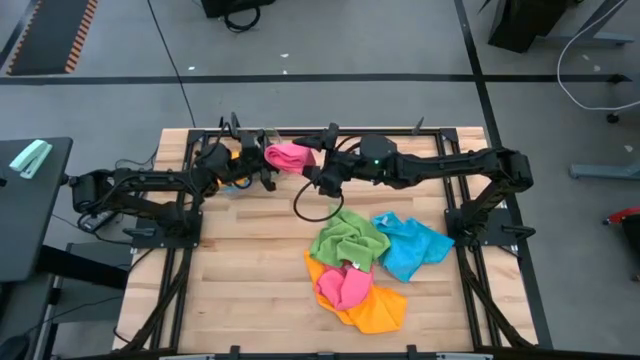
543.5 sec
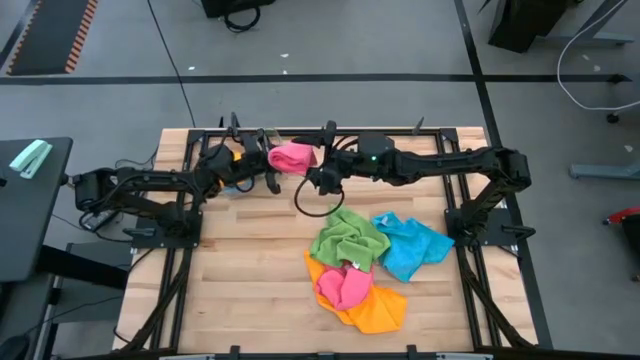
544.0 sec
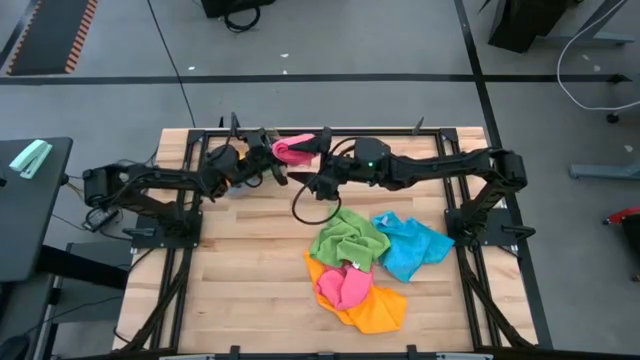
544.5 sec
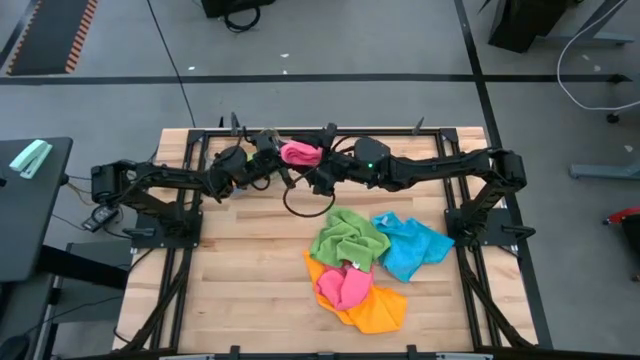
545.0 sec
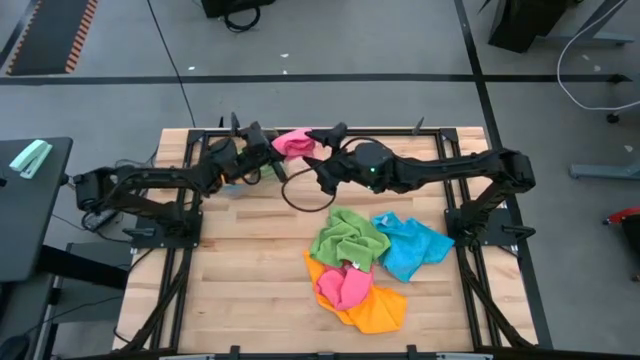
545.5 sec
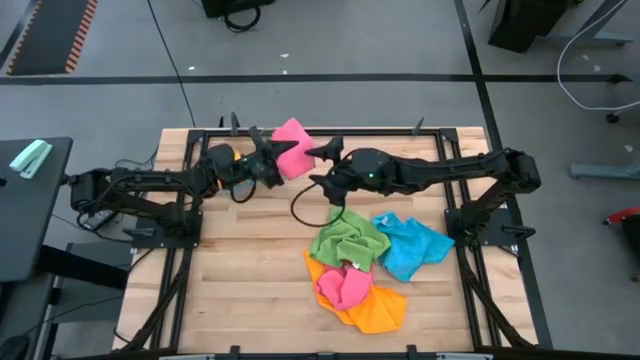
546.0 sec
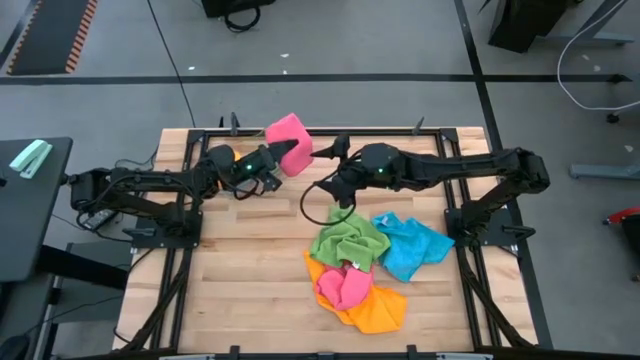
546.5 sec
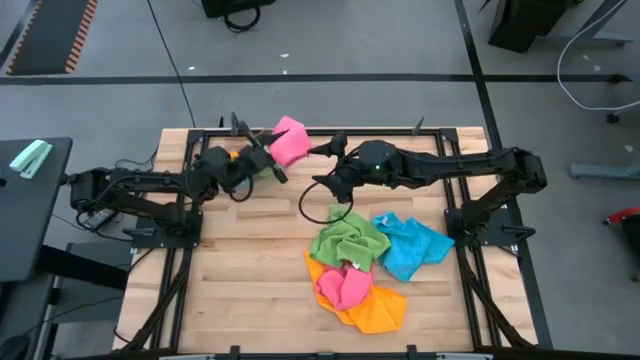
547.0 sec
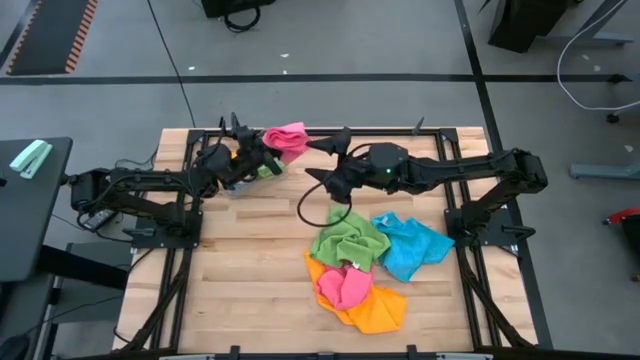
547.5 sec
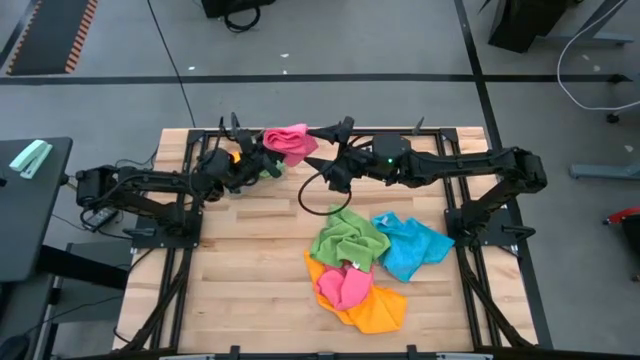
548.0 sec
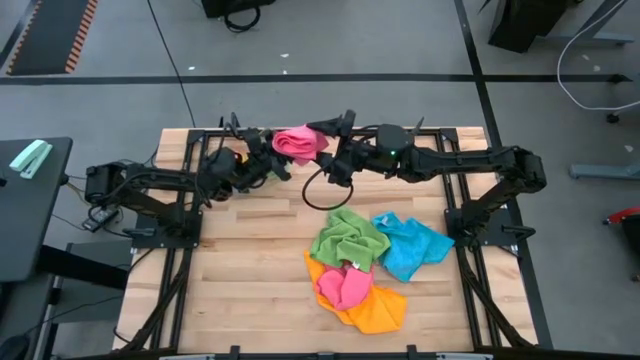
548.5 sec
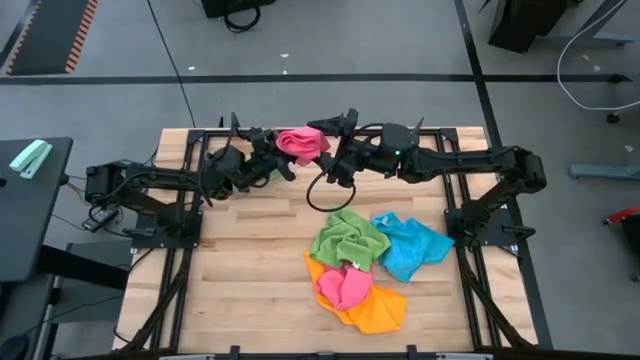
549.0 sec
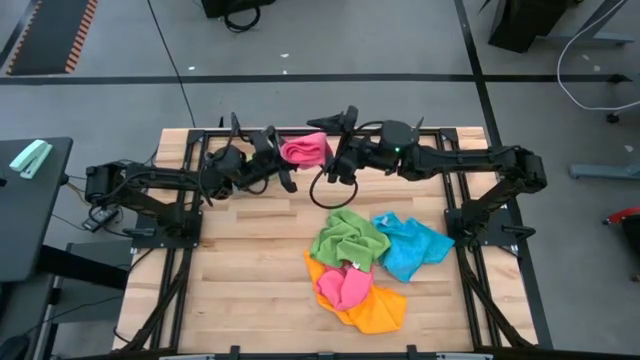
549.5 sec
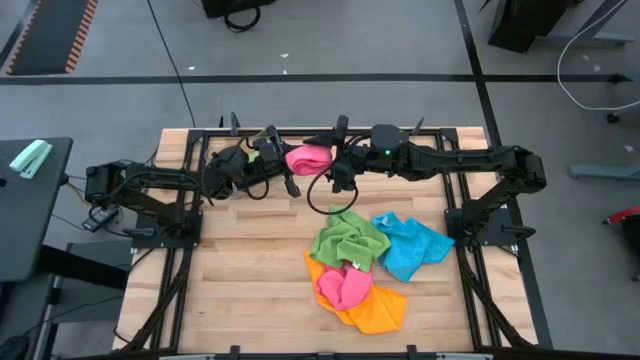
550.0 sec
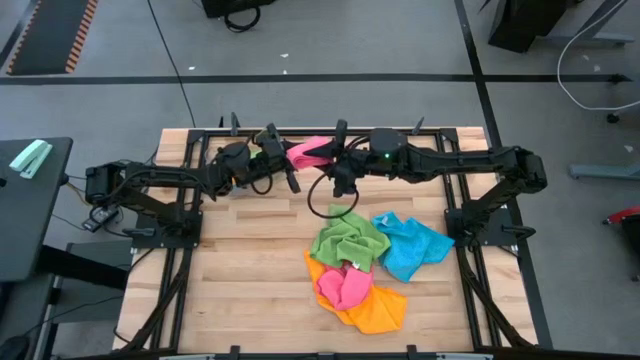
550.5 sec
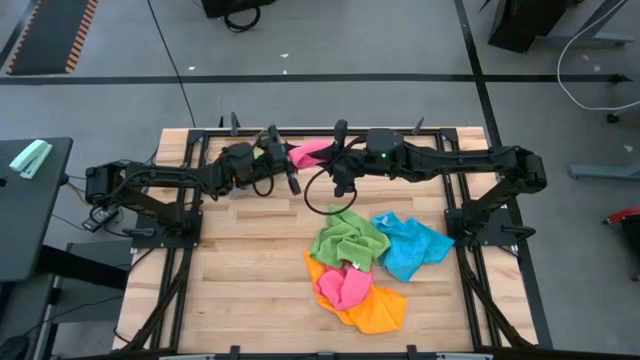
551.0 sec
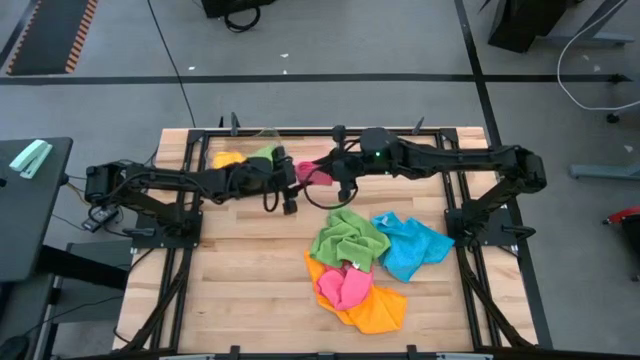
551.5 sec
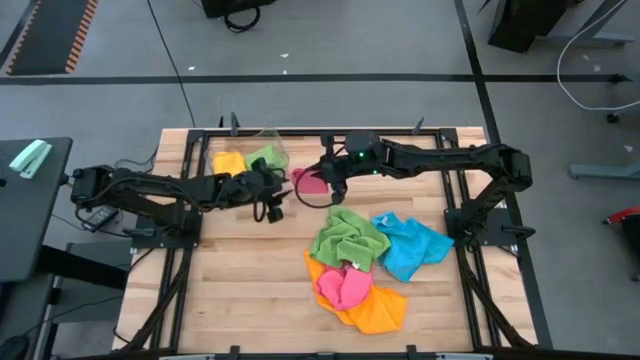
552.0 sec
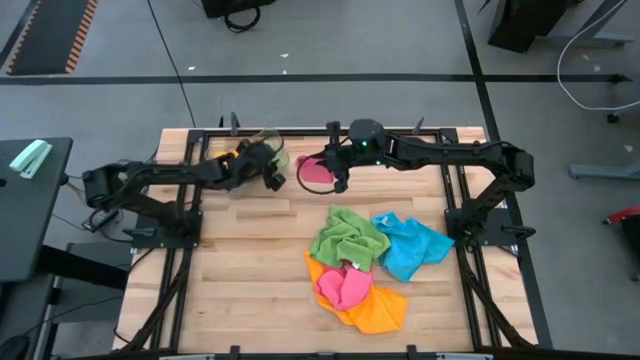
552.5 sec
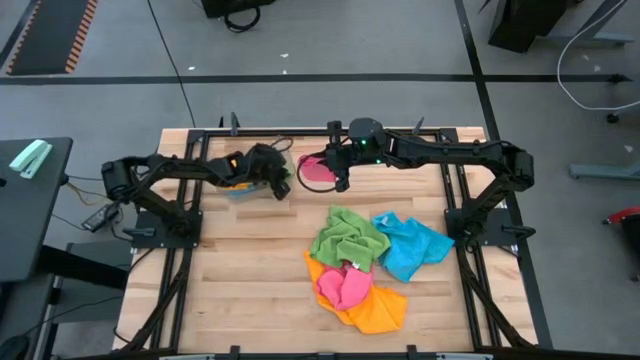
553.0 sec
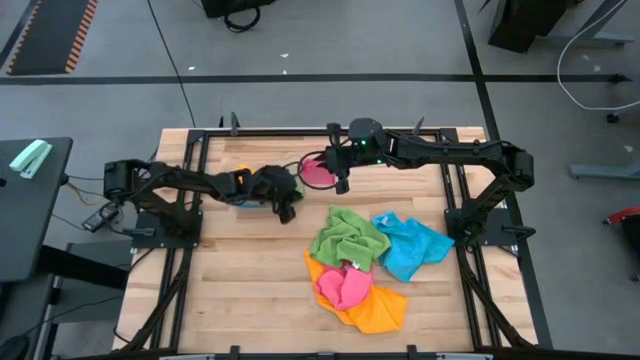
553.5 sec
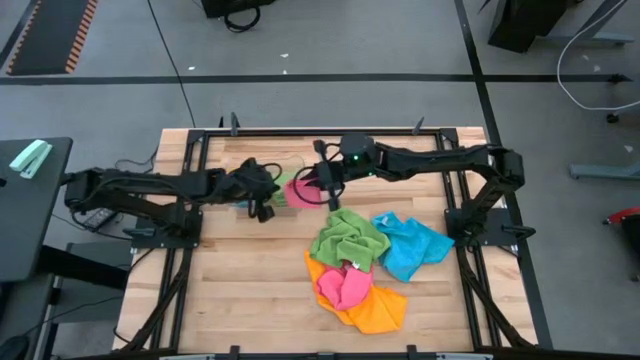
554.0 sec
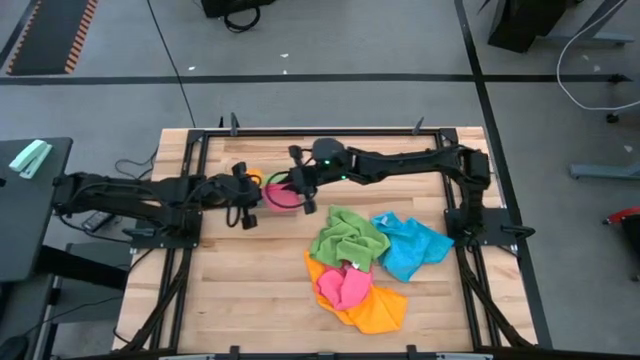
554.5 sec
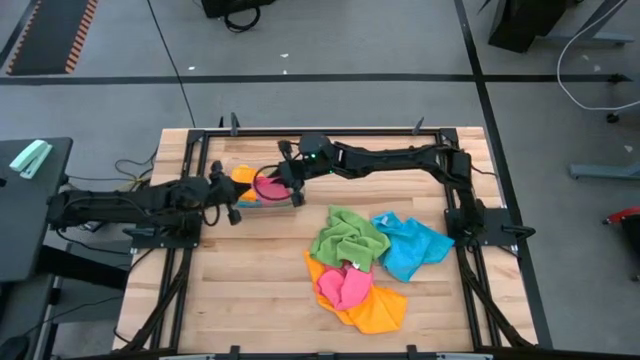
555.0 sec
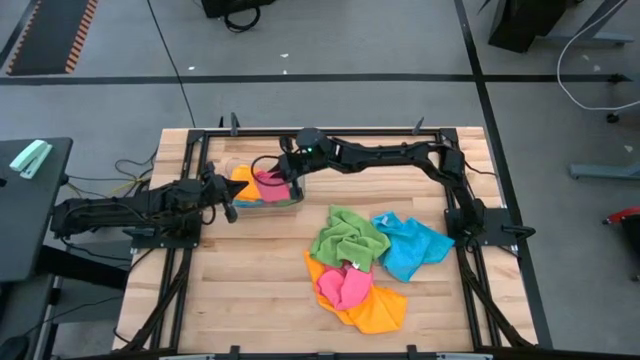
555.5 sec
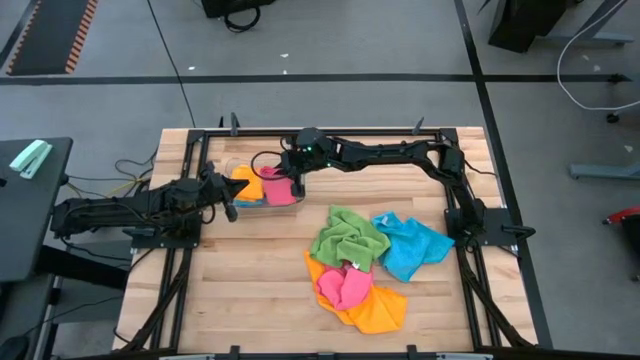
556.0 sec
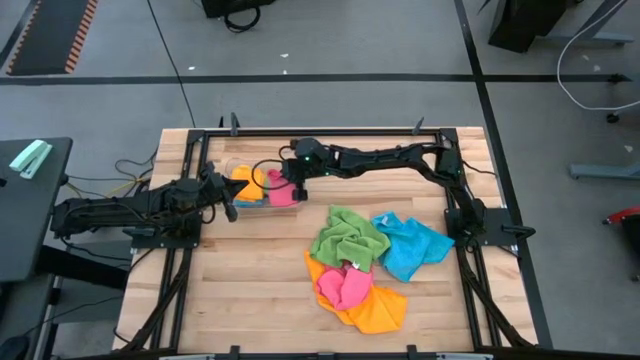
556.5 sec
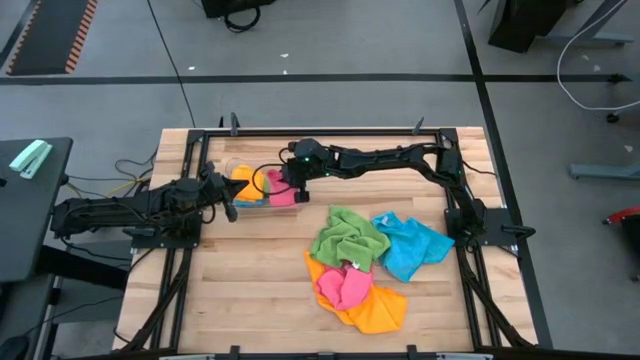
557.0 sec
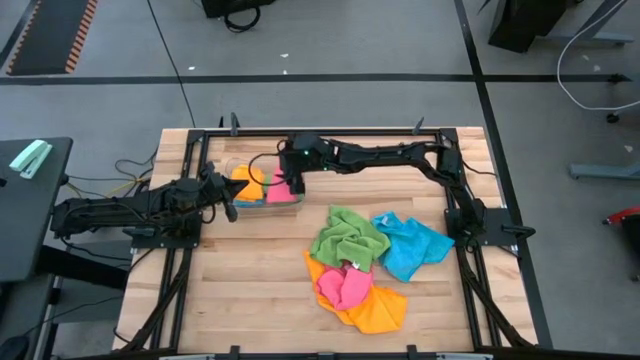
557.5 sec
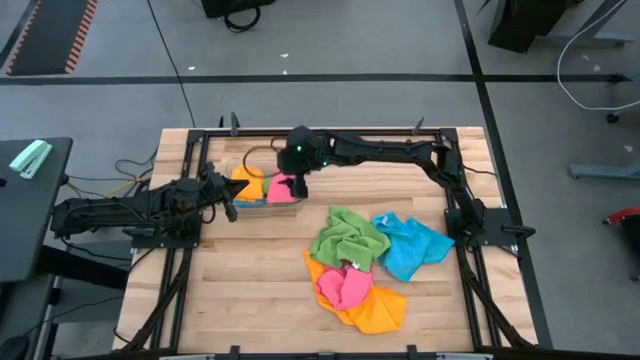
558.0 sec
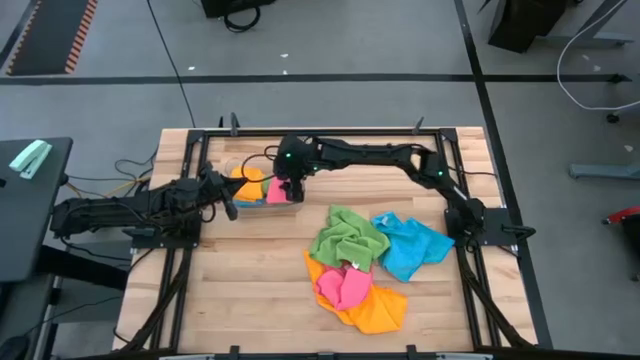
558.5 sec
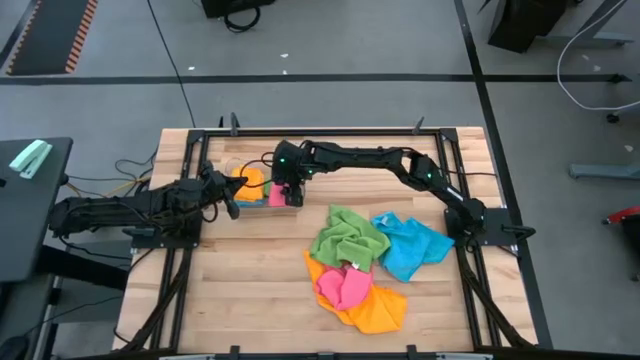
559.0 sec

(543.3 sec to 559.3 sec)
Task: Fold microfiber towels
Stack the left pink microfiber towel on top of the green microfiber towel

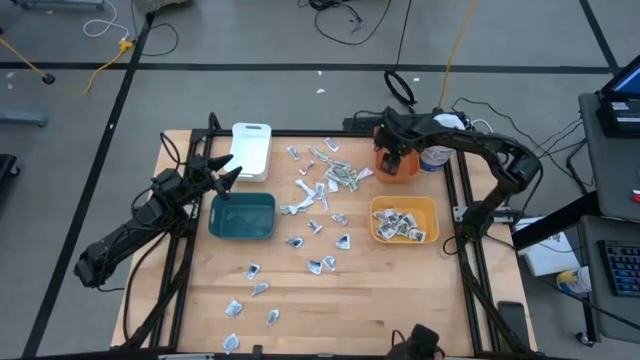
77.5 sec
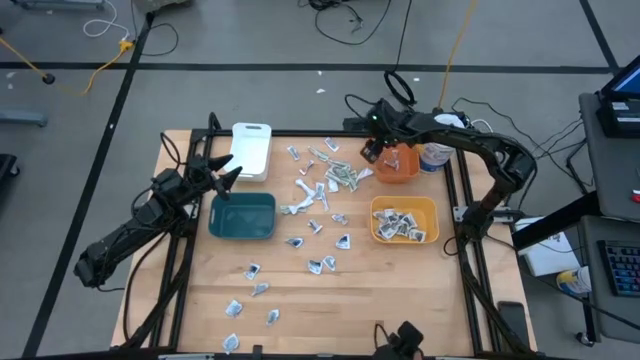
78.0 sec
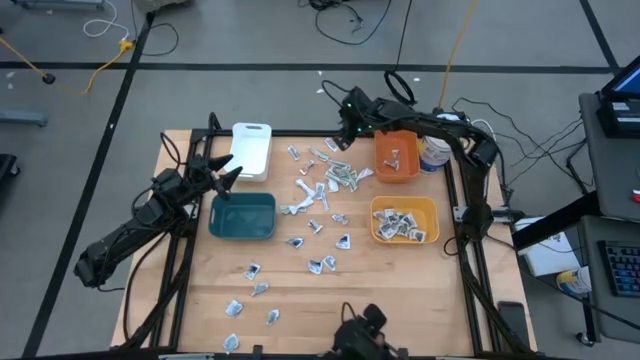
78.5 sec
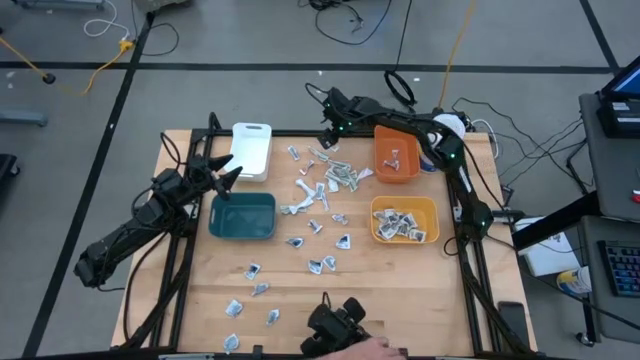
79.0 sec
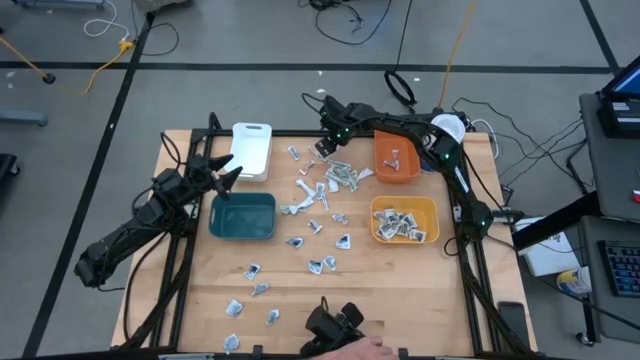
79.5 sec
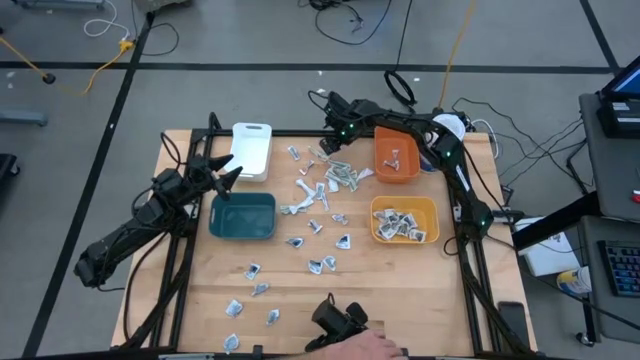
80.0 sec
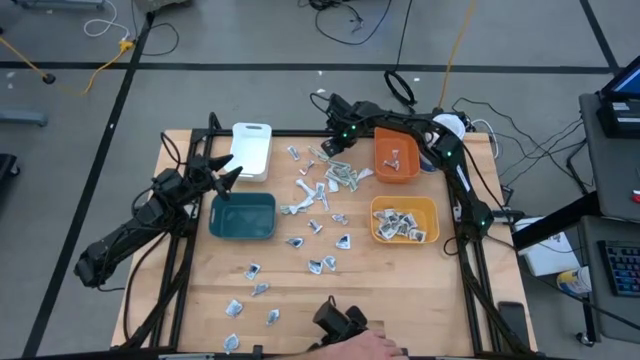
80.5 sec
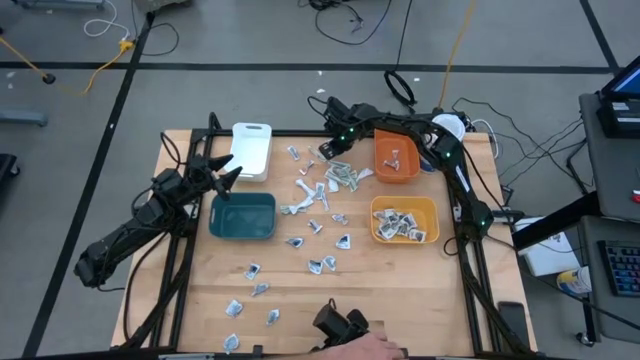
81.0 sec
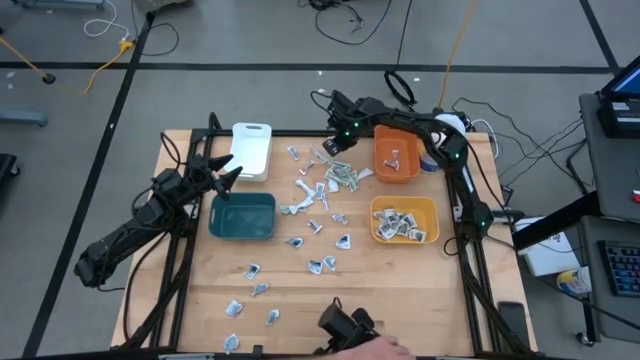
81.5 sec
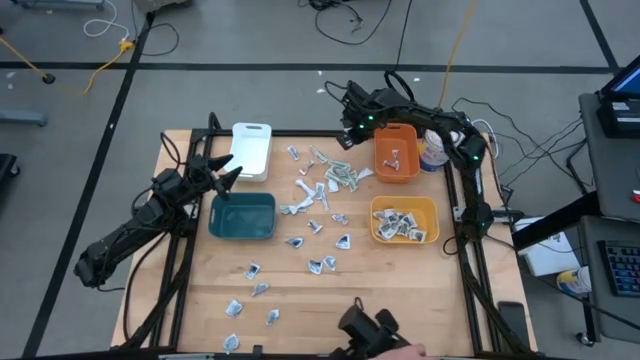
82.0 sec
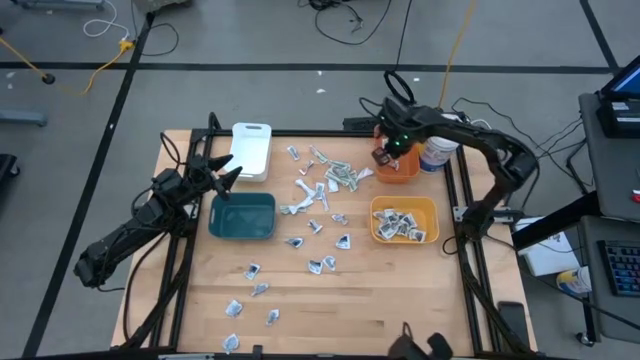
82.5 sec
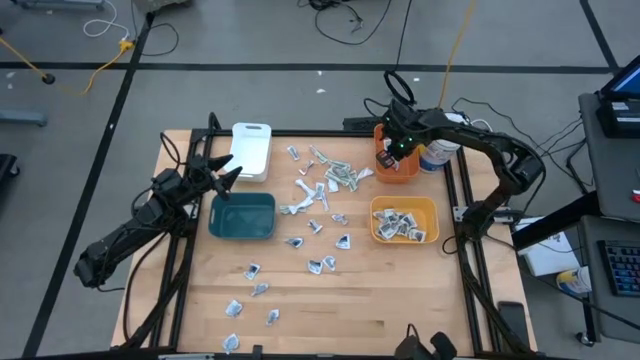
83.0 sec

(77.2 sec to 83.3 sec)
Task: Pick & Place First Aid Supplies
Put the antibiotic ointment into the orange bin
